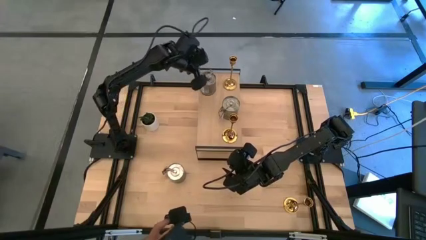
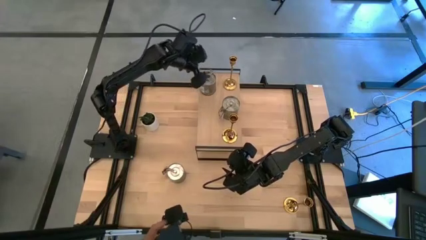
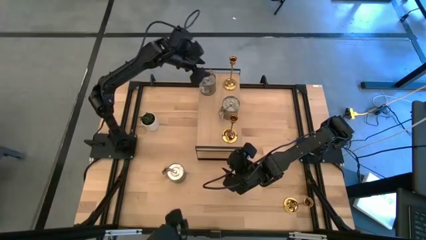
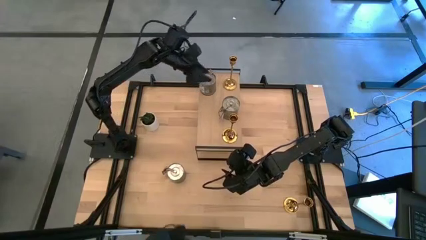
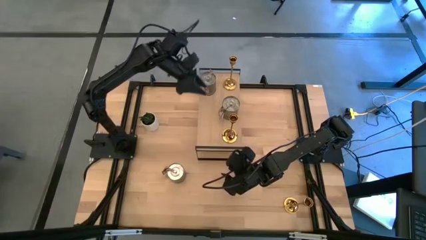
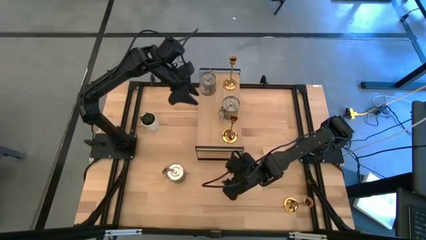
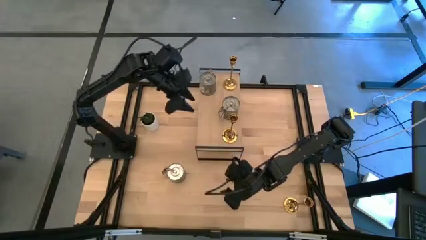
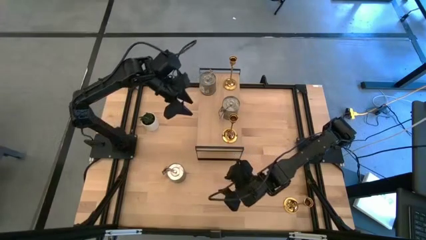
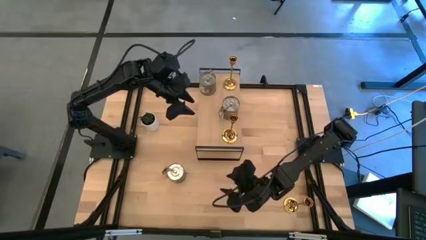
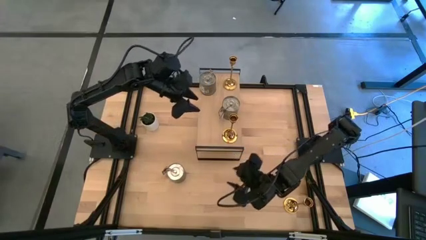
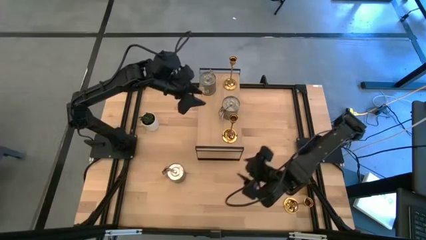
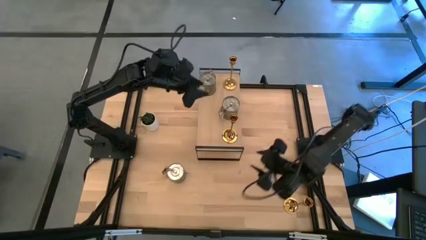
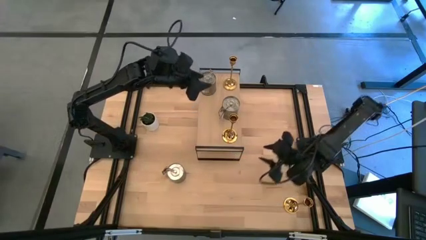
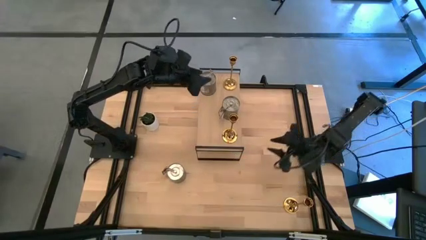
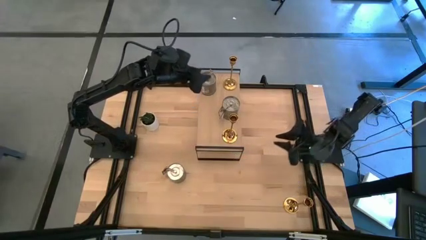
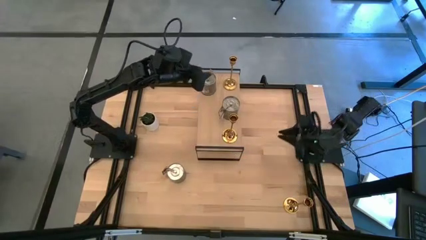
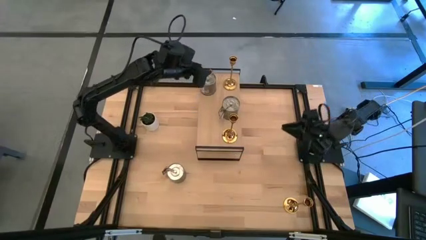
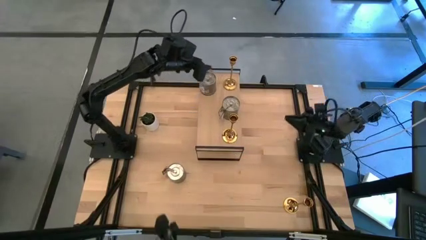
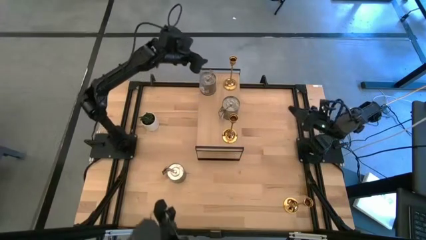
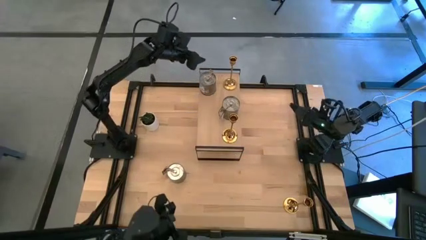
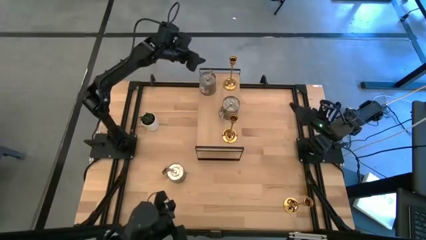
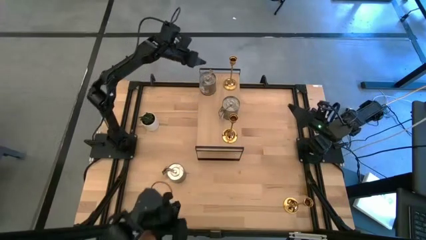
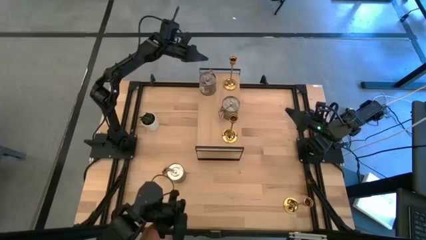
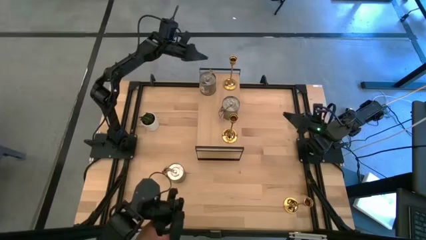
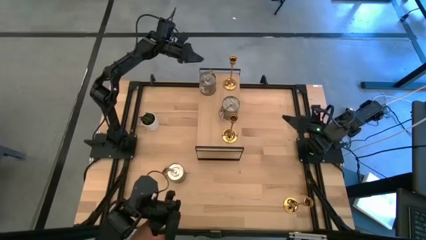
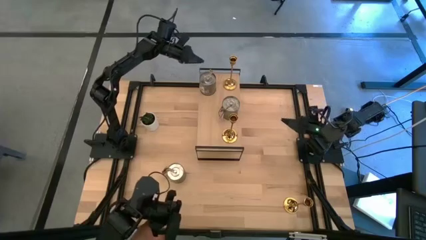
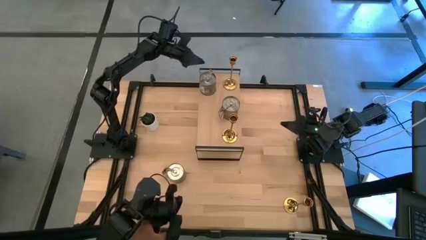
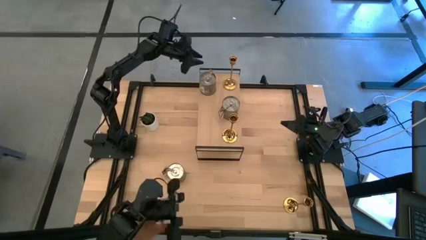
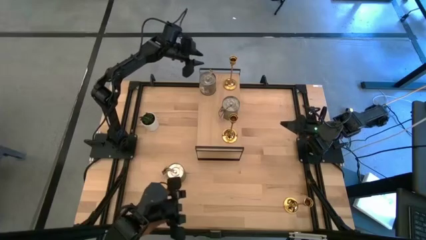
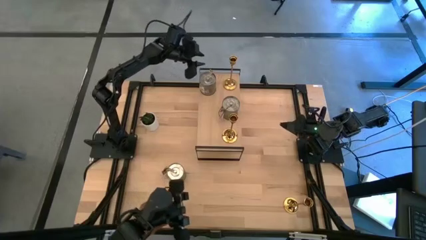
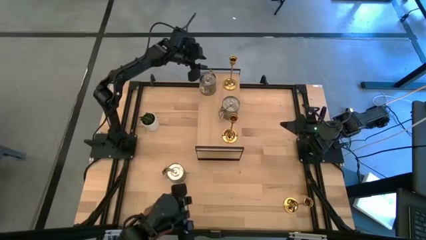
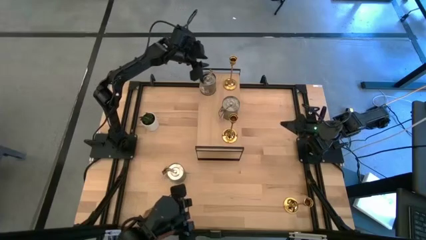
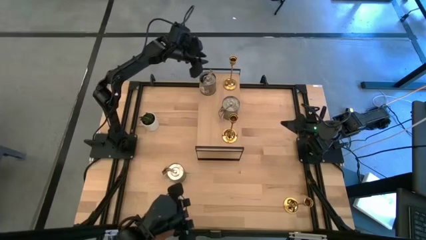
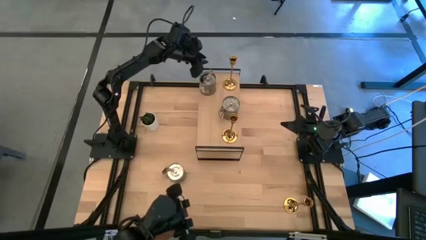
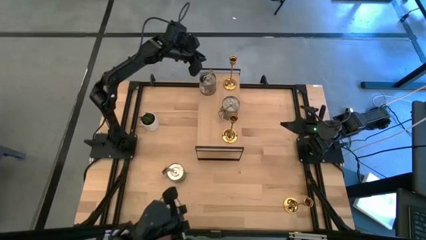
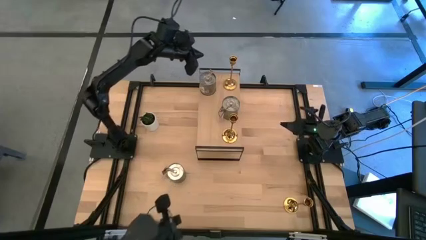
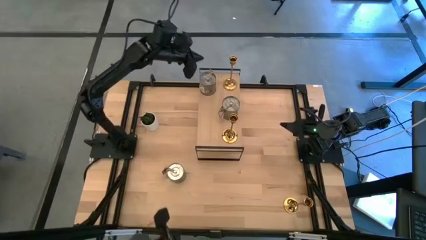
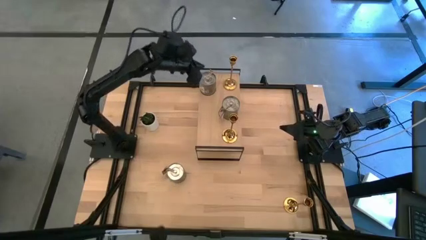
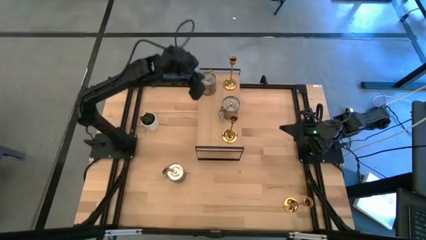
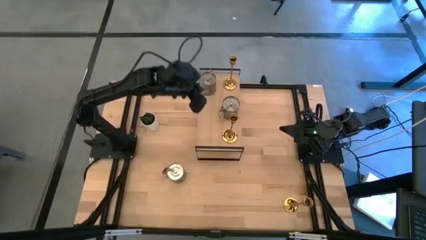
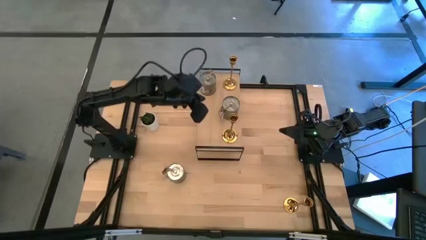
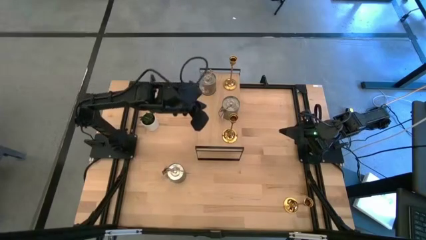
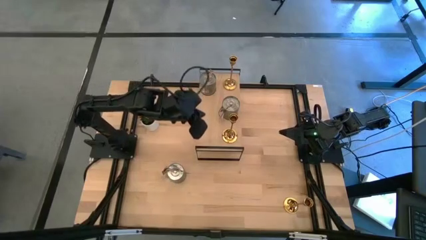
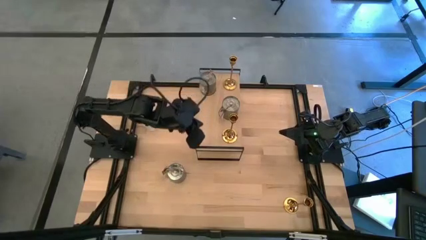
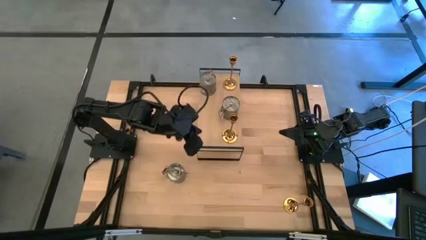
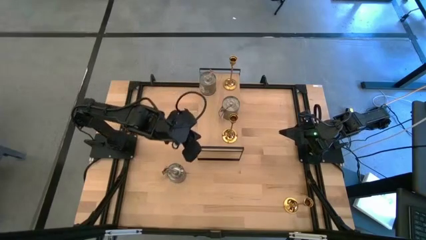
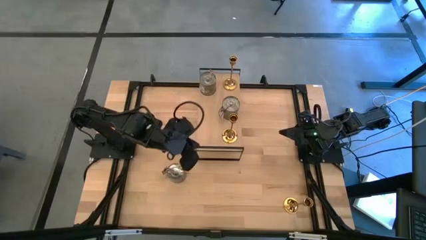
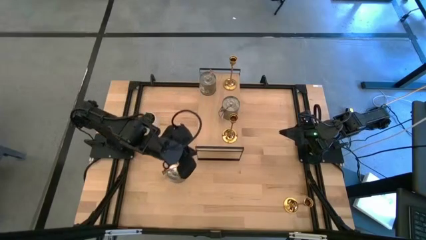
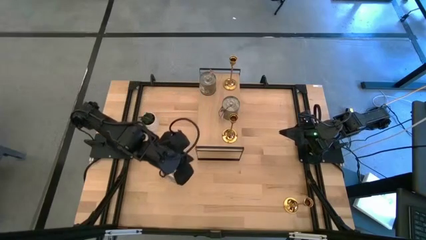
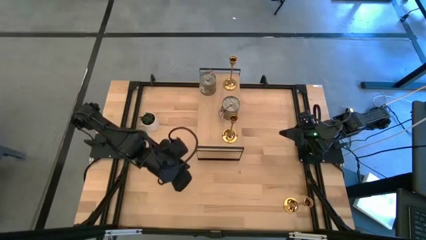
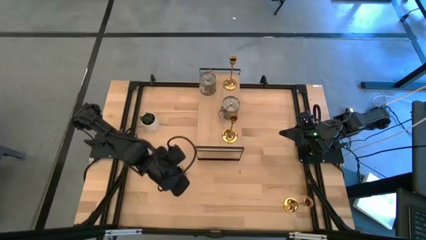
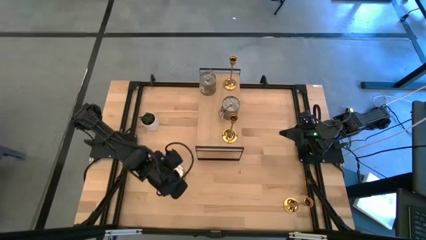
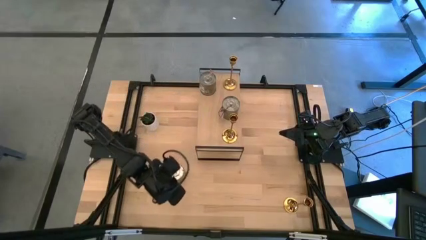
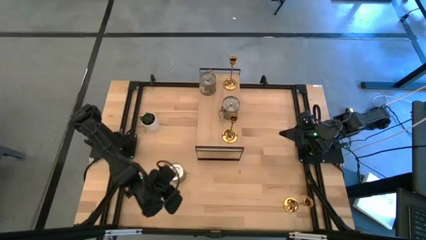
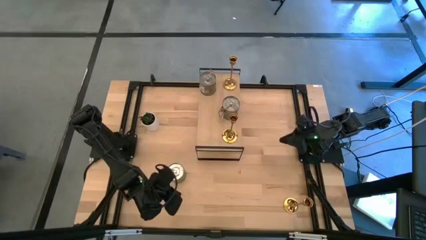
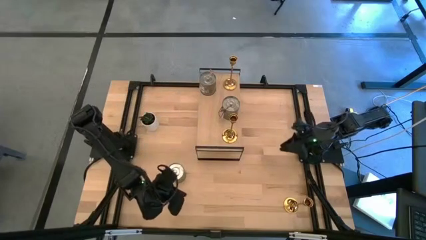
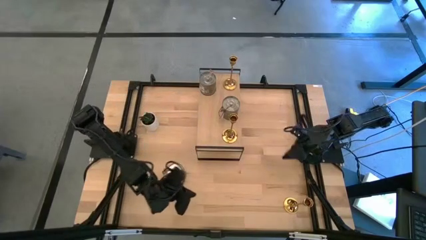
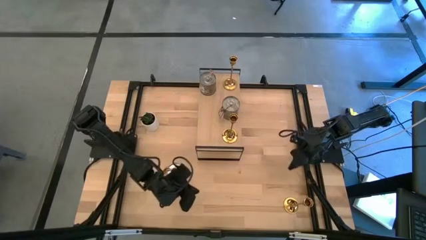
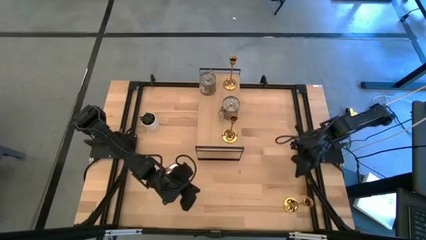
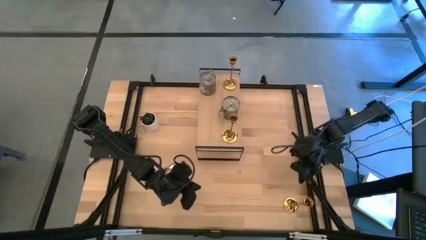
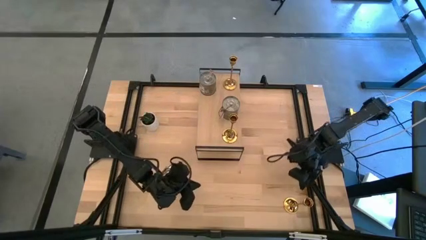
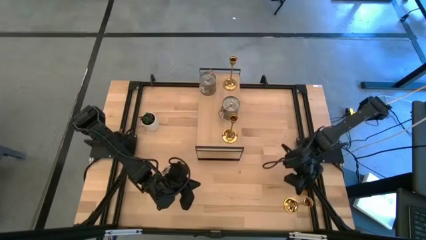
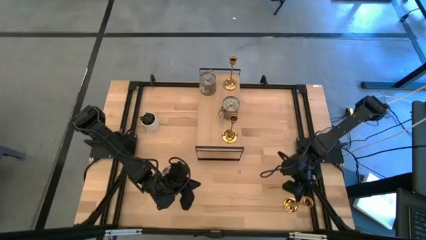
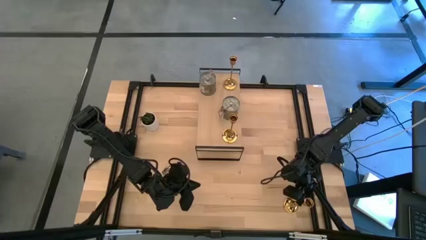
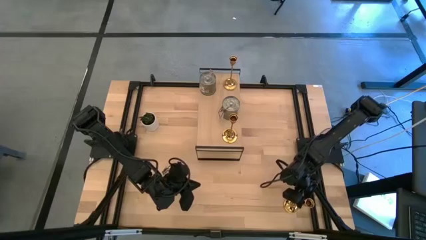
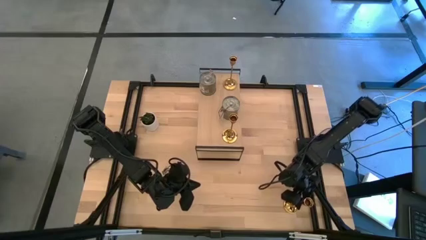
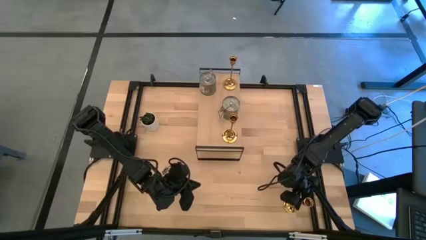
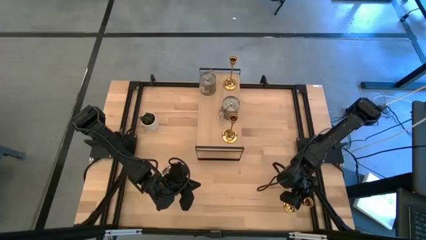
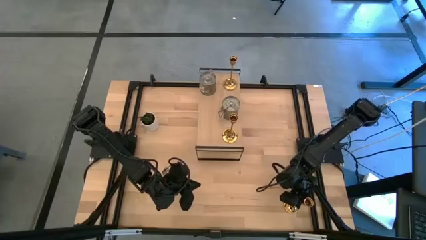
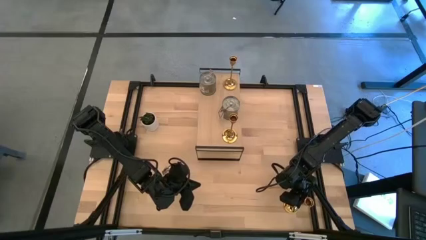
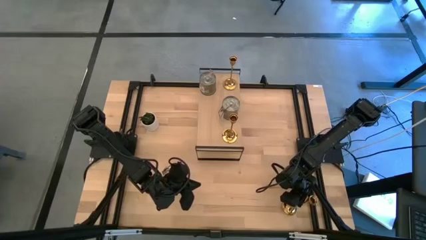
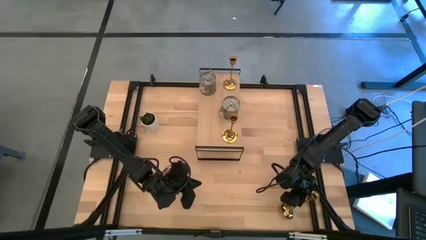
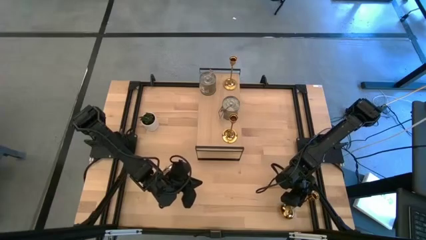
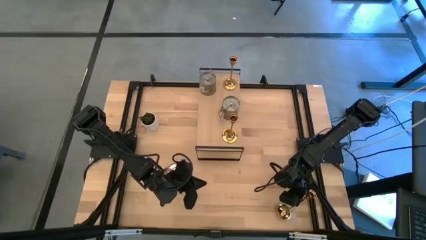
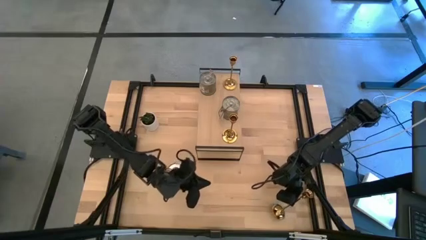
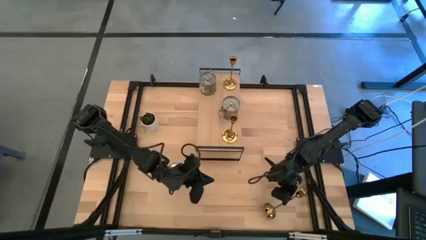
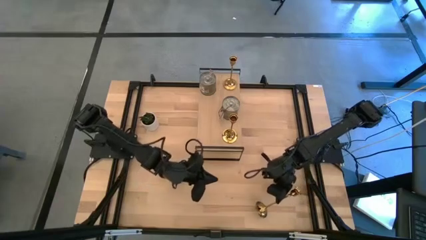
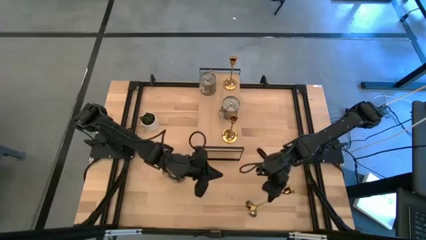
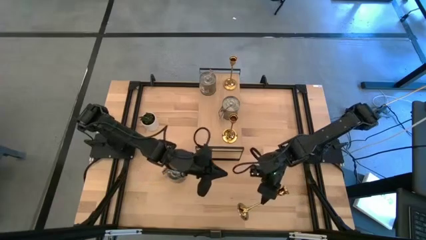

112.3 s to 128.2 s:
Task: Pick & Place candle stick holders
Put the gold candle holder on the shelf

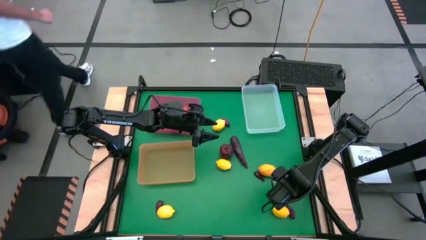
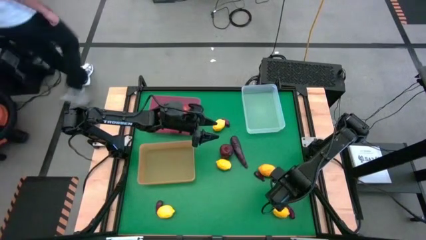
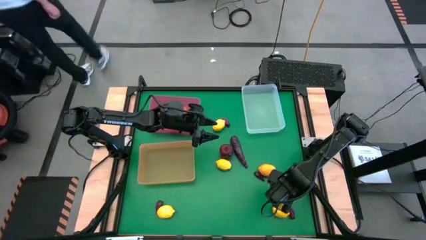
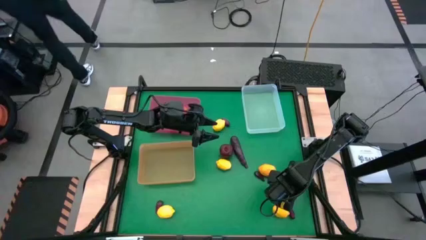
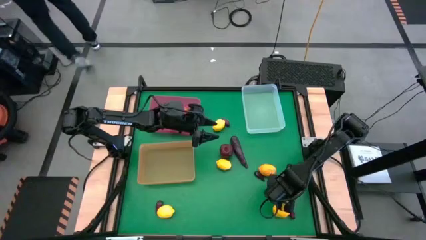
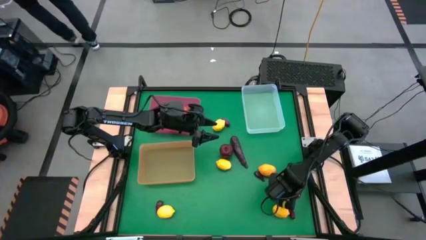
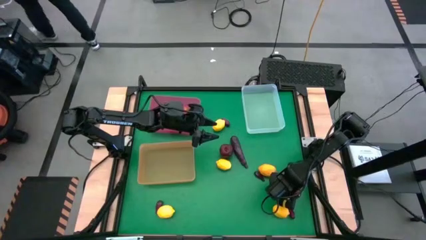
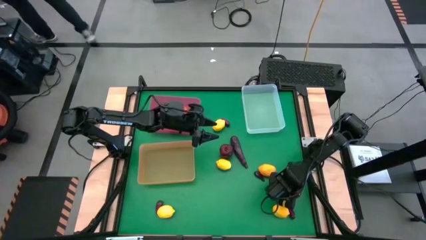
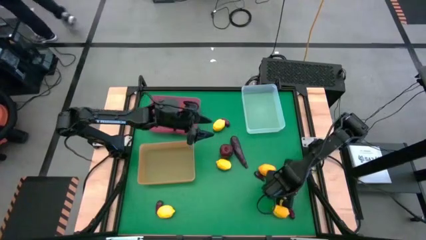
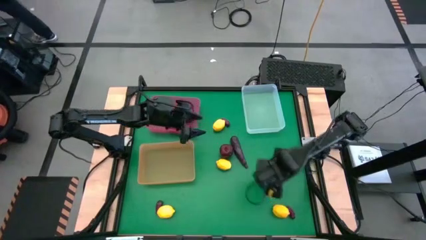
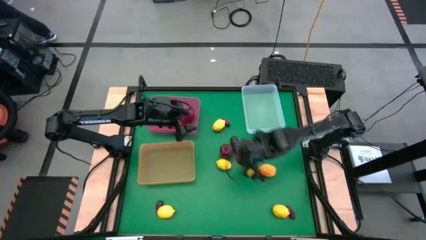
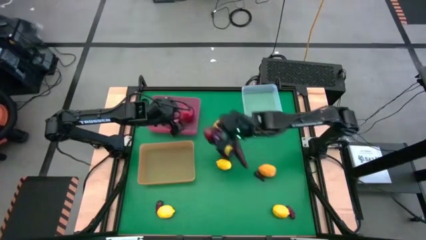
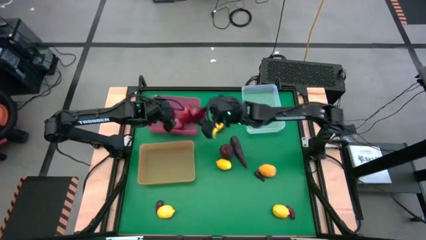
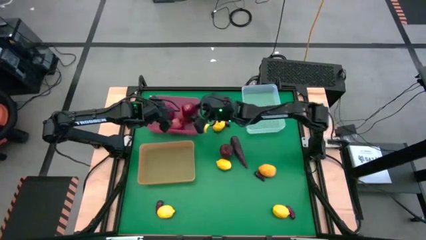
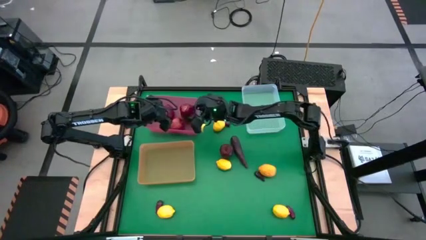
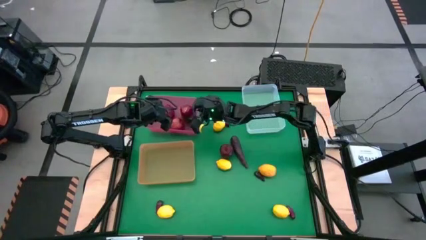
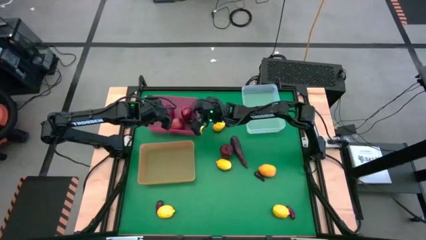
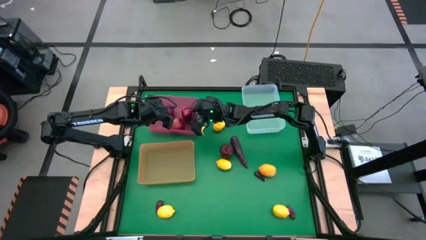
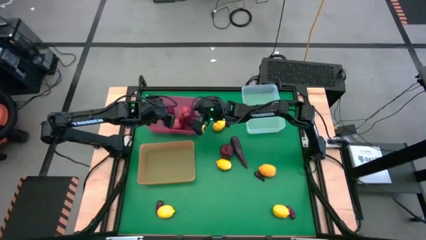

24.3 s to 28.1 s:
Task: Sort produce into baskets
Put the apple into the pink bin
